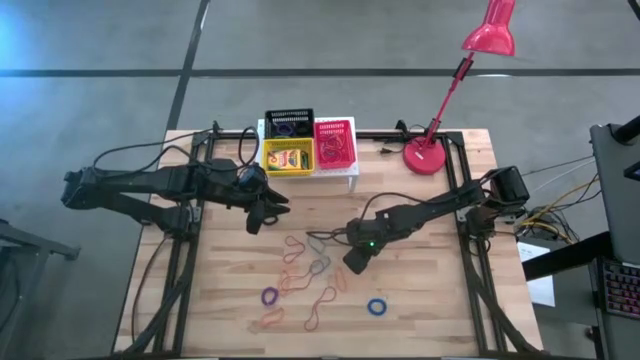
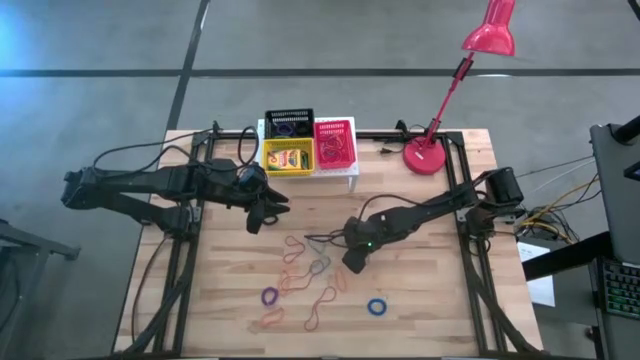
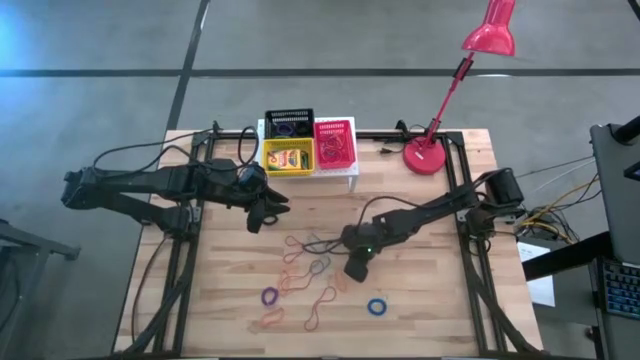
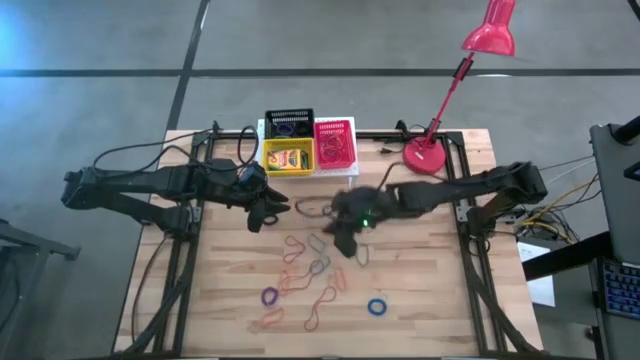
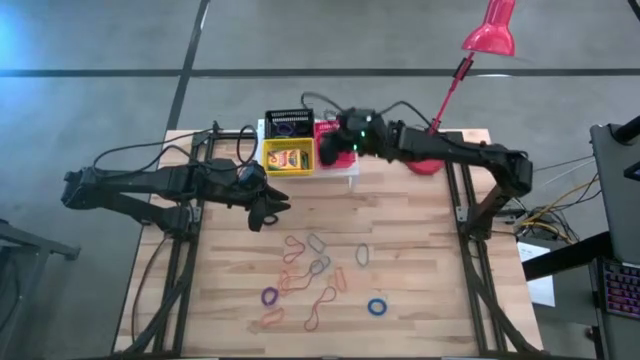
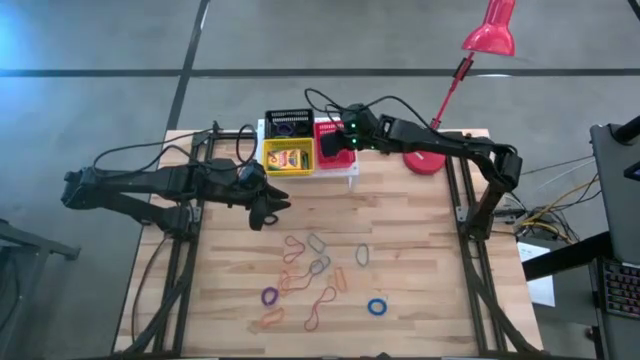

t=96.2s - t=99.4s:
Task: Pick & Place Office Desk Supplies
Put the orange rubber band into the red basket on the shelf

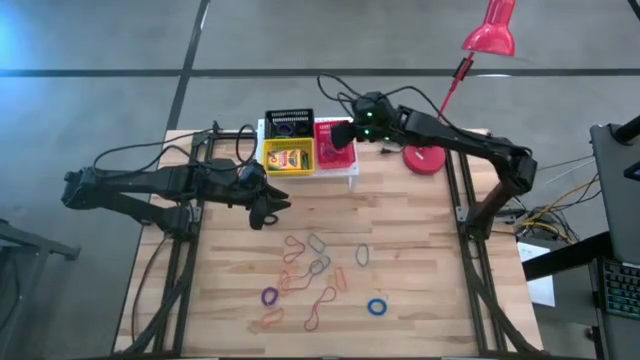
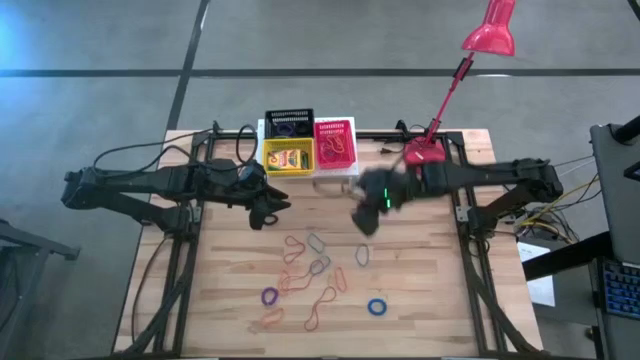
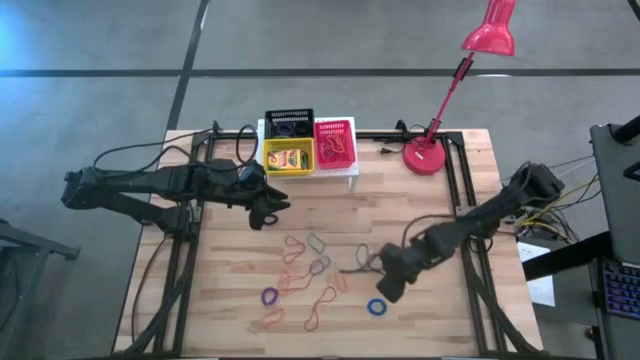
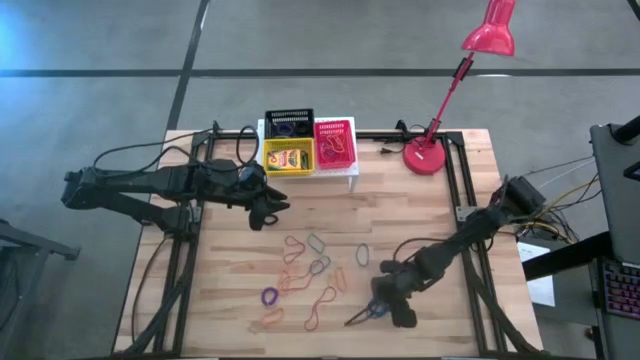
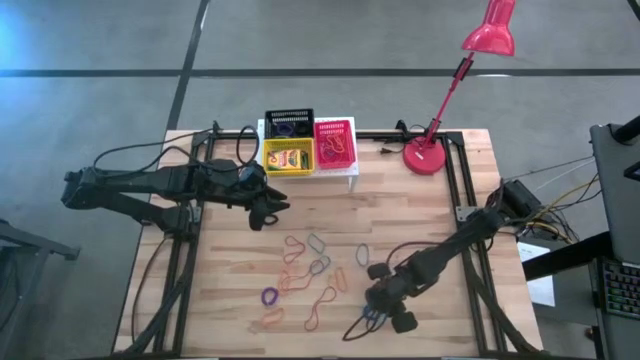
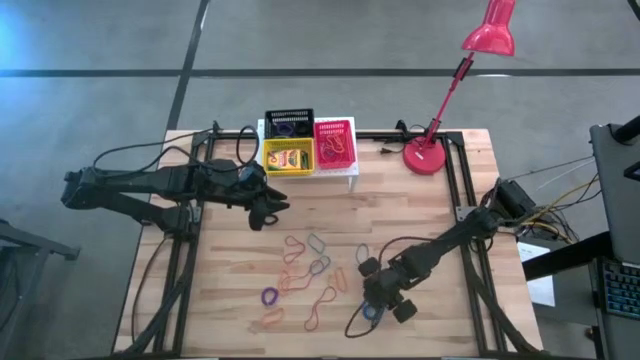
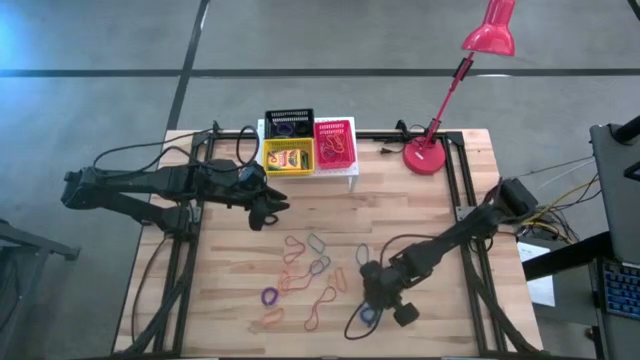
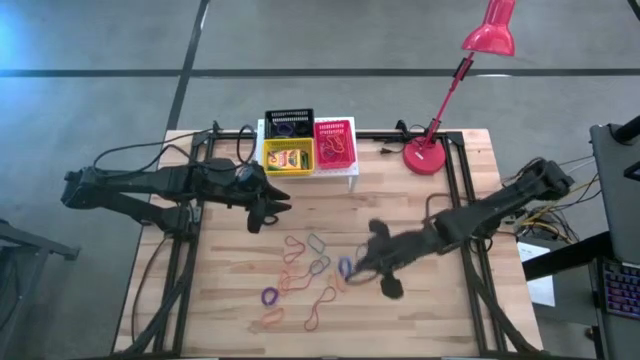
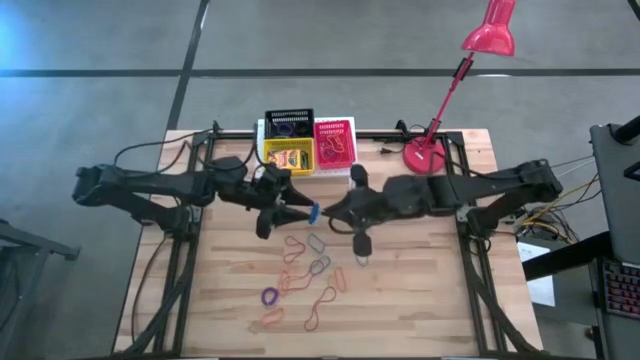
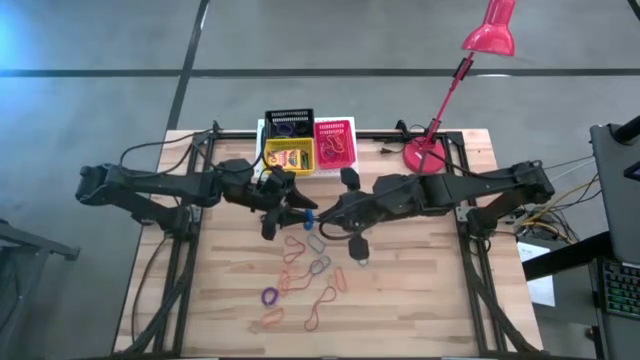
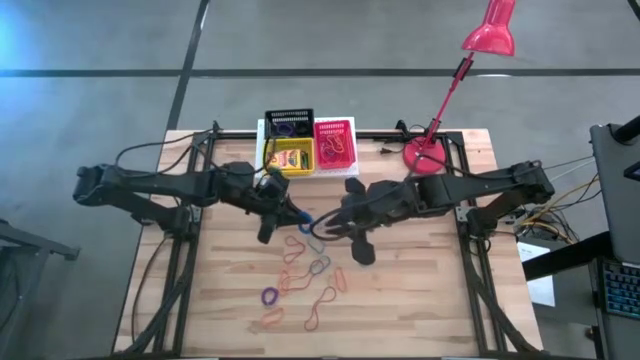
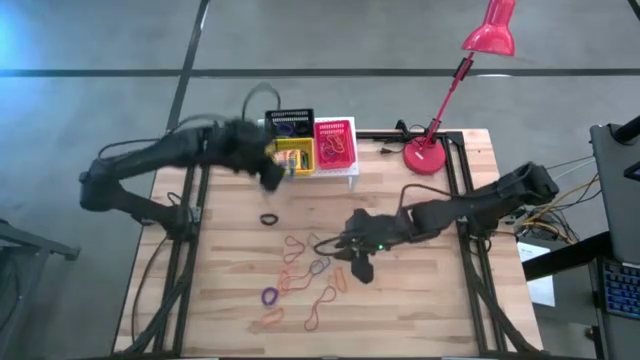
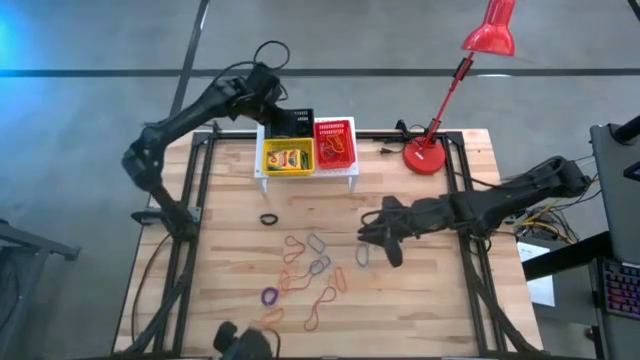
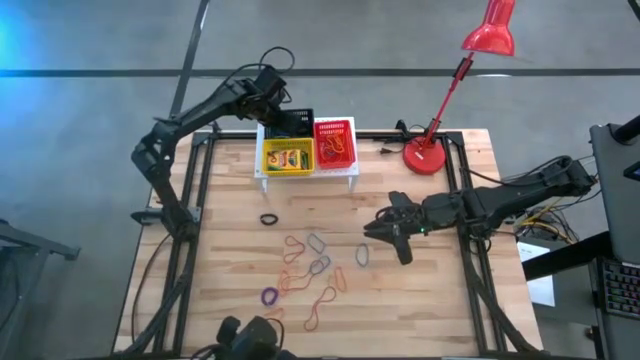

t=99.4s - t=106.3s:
Put the blue spring keychain into the black basket on the shelf

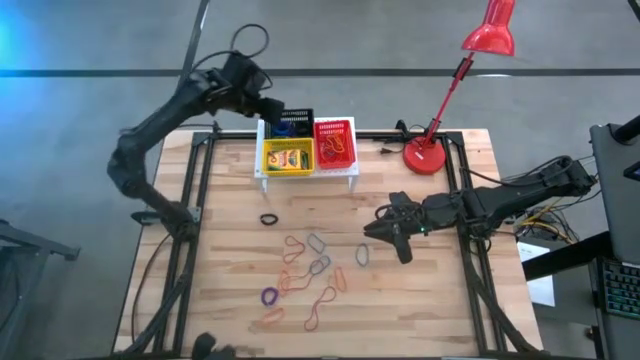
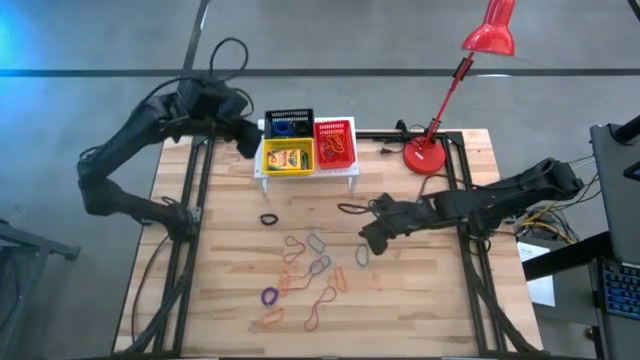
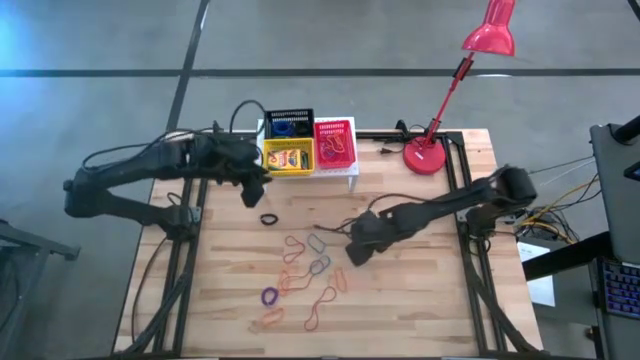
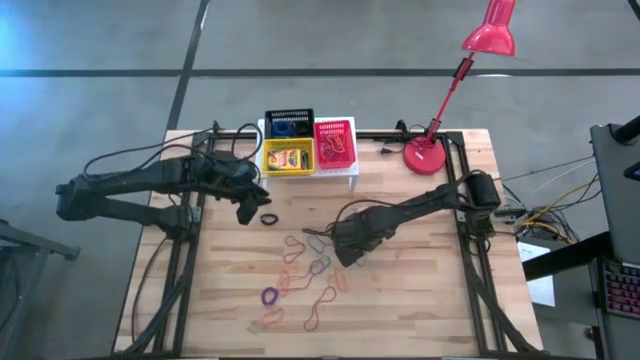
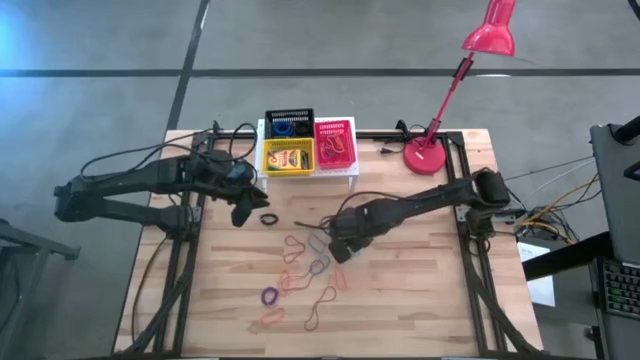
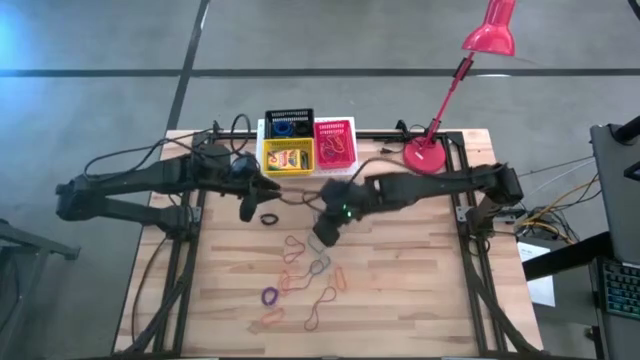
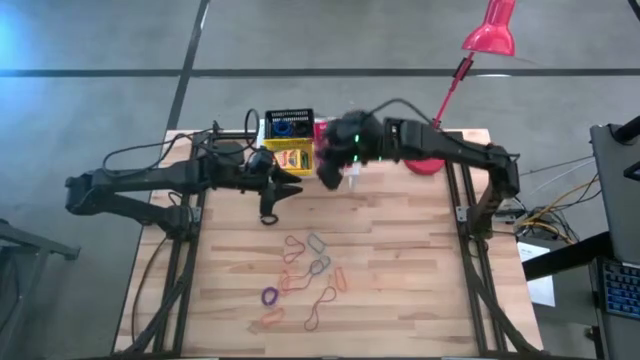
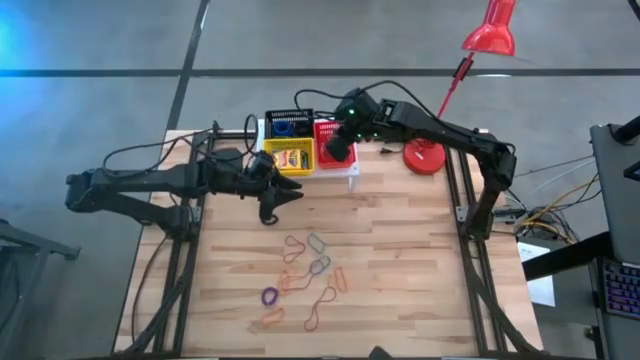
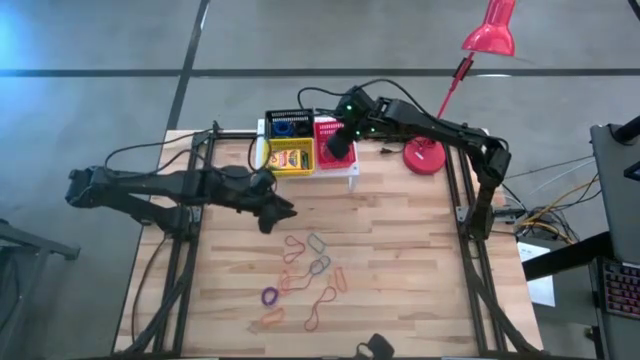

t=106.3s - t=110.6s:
Put the blue rubber band into the red basket on the shelf

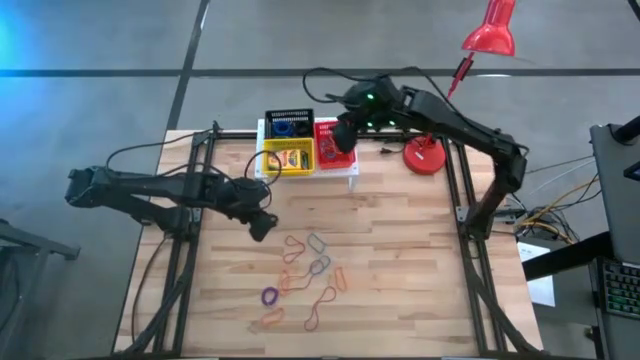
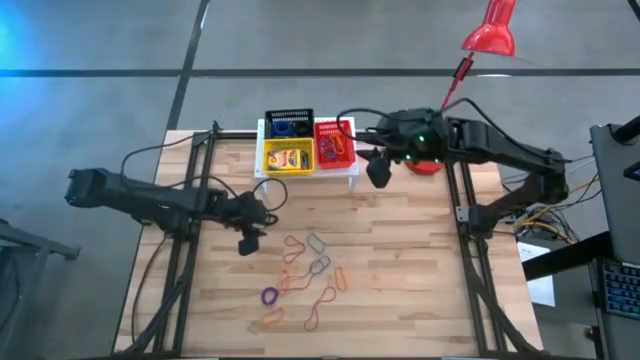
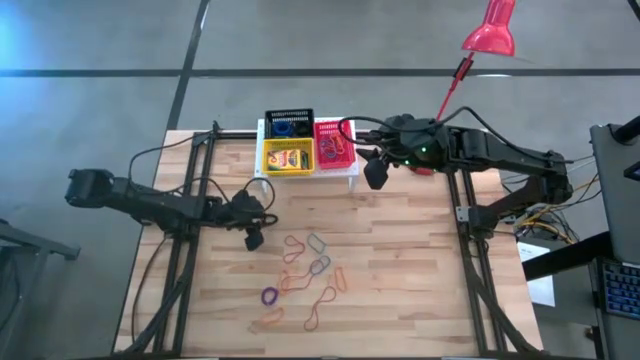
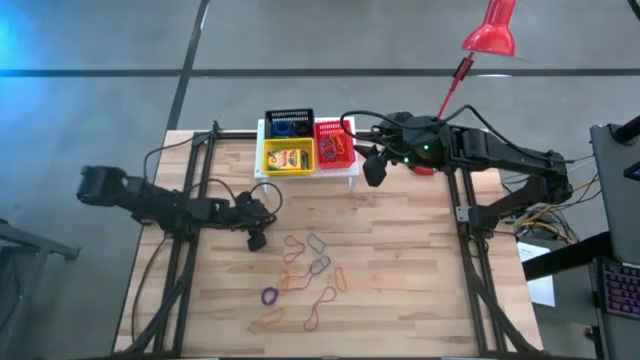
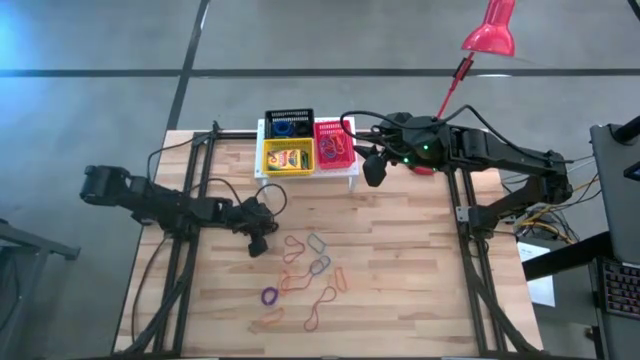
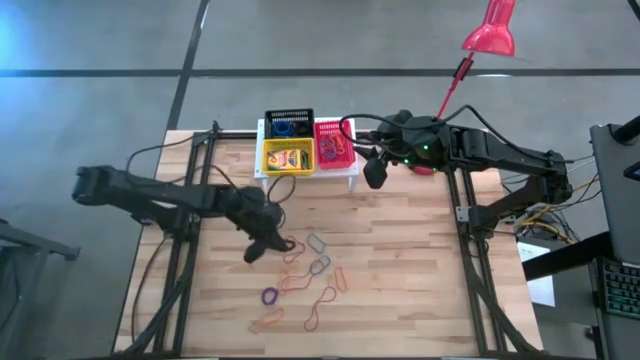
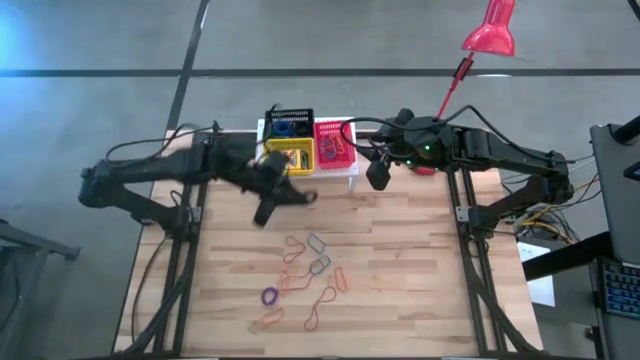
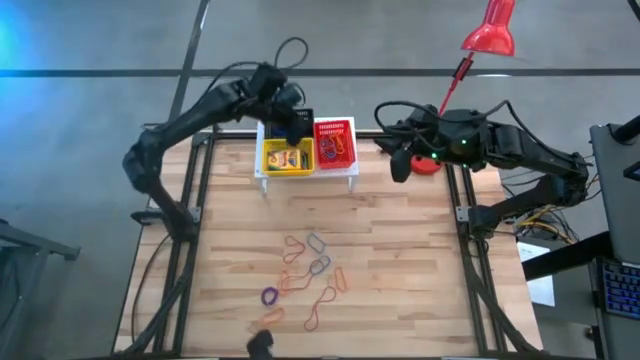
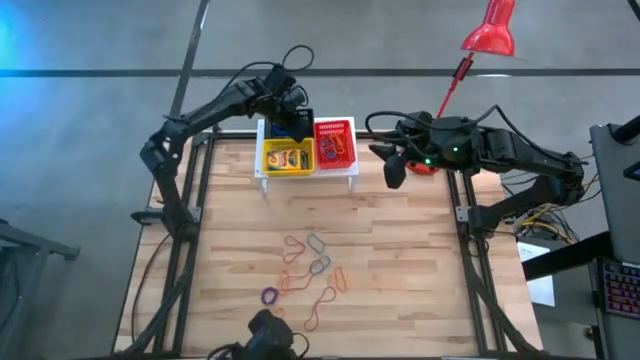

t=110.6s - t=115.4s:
Put the black spring keychain into the black basket on the shelf

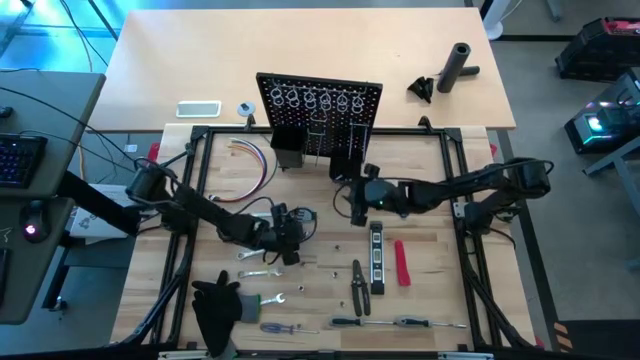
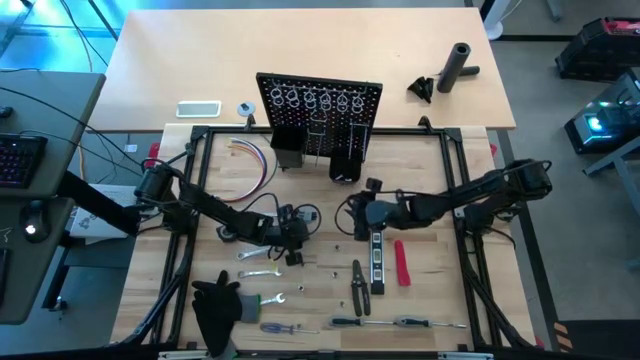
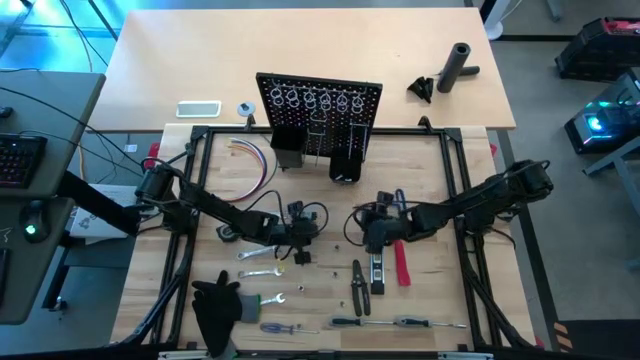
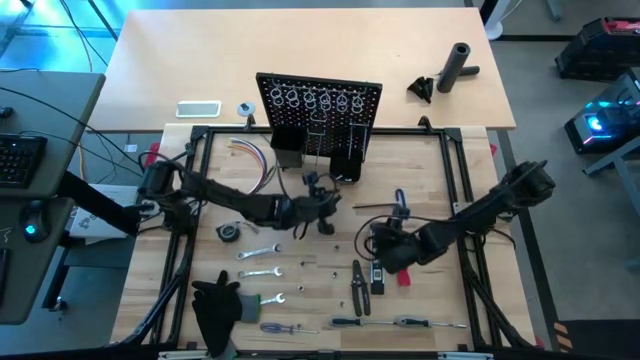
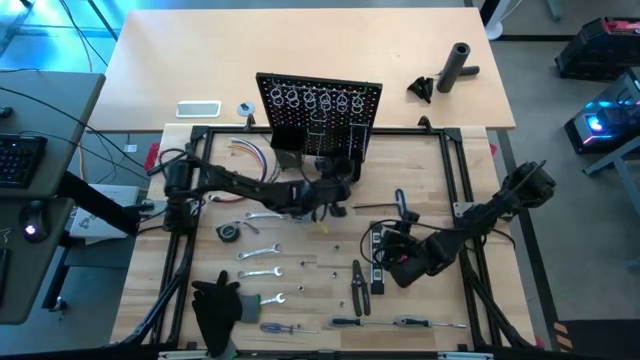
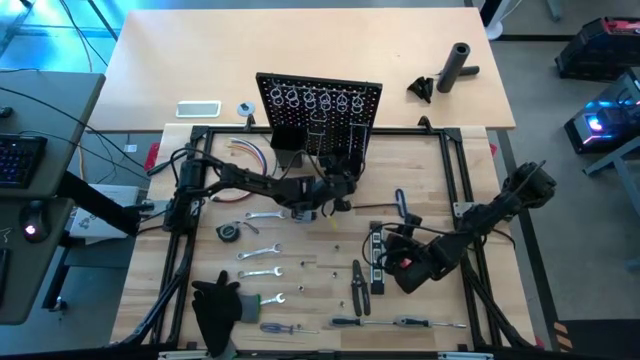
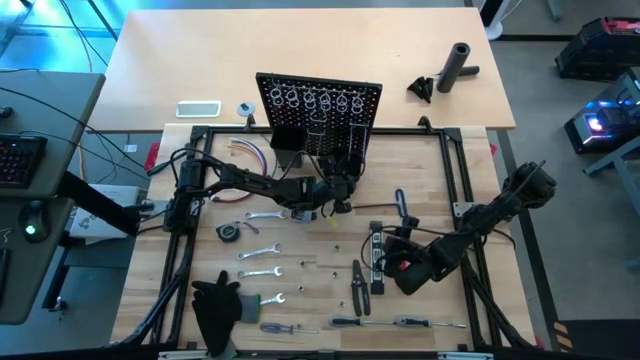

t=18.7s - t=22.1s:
Task: Hang tools onto peg board
Put the socket into the small black bin on the black pegboard
